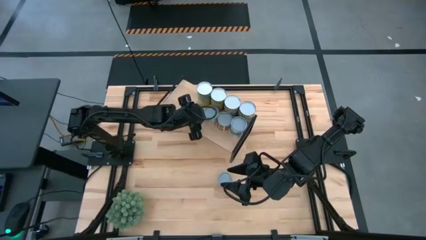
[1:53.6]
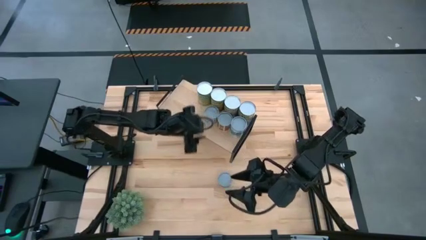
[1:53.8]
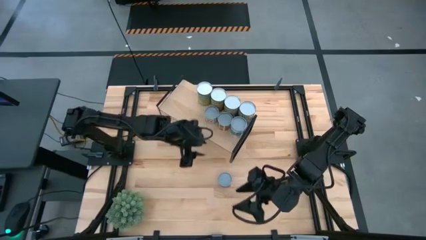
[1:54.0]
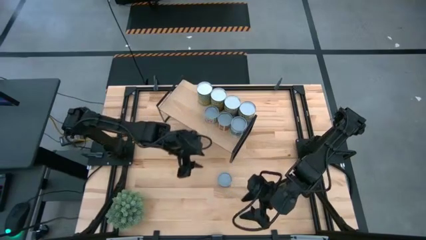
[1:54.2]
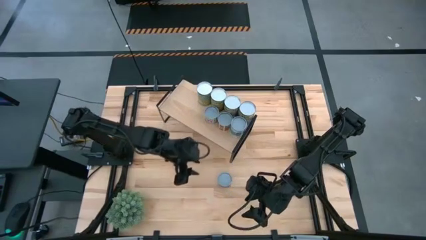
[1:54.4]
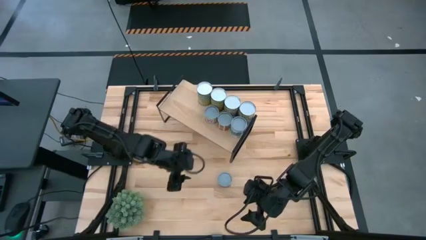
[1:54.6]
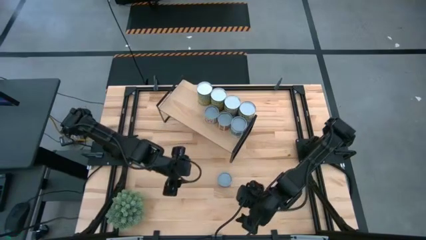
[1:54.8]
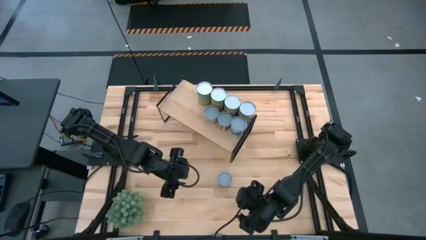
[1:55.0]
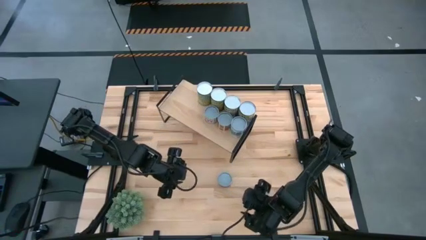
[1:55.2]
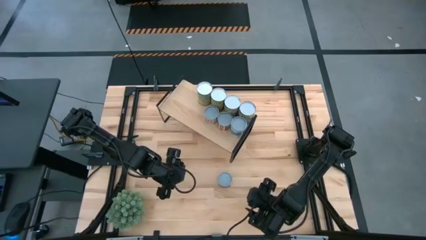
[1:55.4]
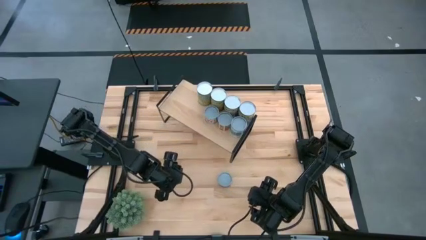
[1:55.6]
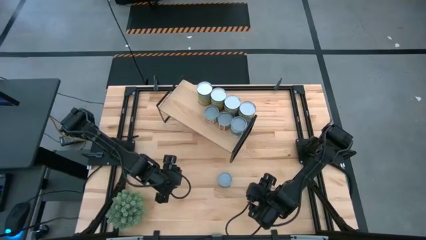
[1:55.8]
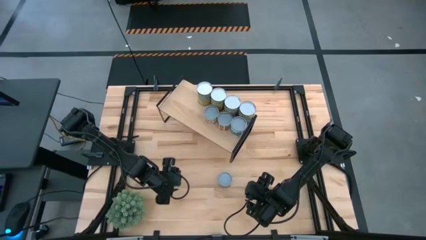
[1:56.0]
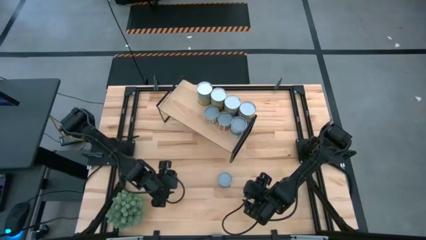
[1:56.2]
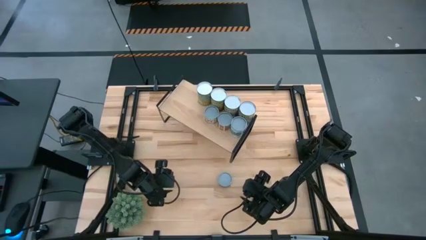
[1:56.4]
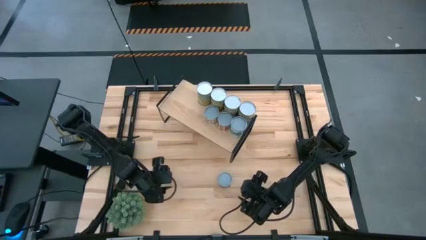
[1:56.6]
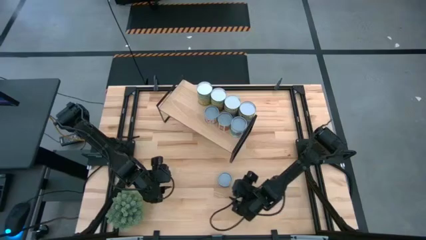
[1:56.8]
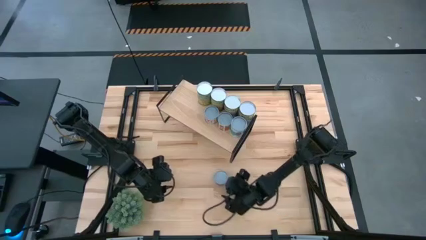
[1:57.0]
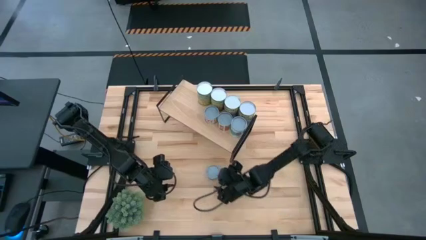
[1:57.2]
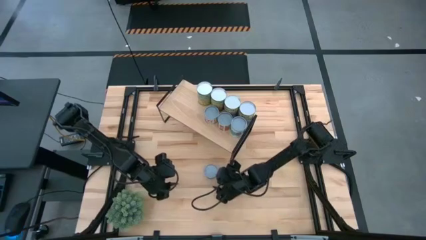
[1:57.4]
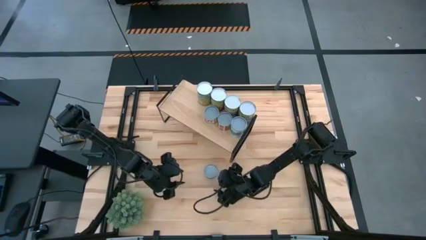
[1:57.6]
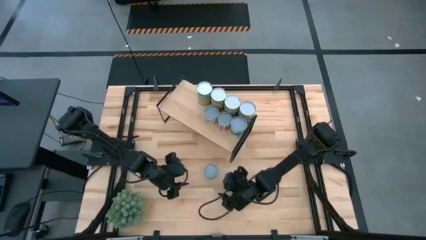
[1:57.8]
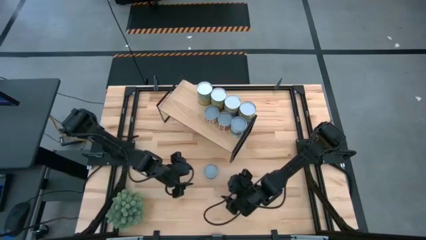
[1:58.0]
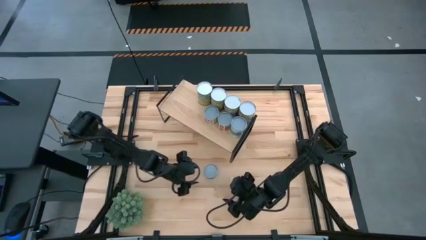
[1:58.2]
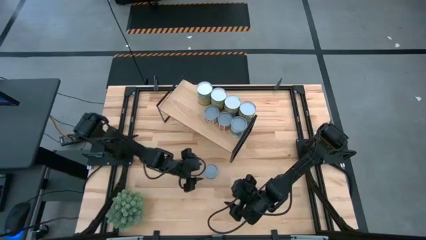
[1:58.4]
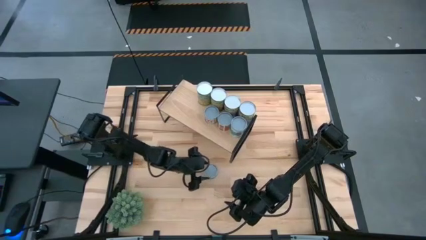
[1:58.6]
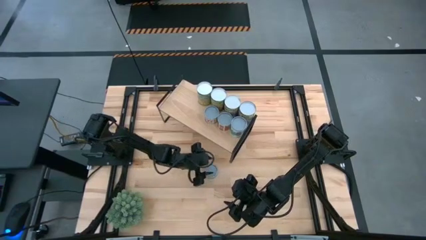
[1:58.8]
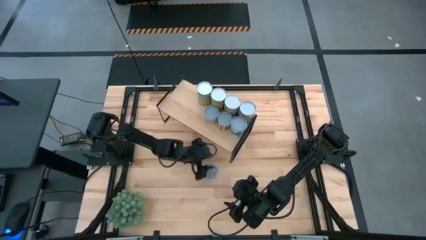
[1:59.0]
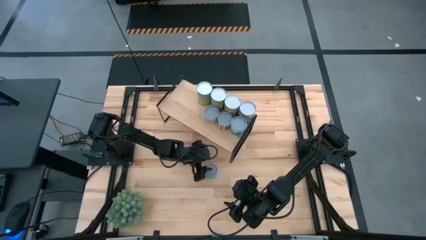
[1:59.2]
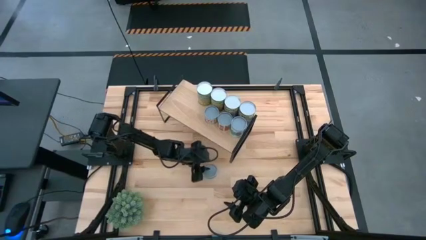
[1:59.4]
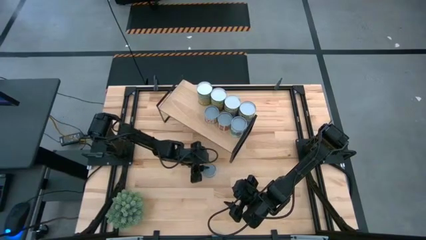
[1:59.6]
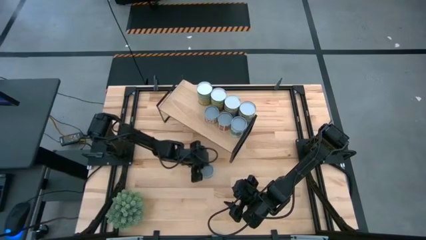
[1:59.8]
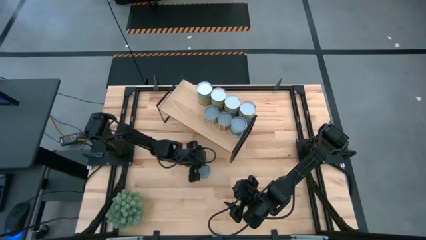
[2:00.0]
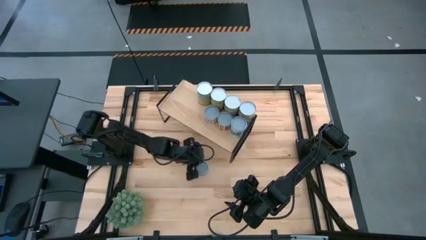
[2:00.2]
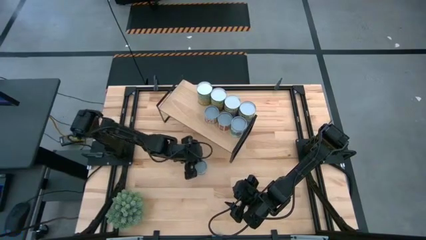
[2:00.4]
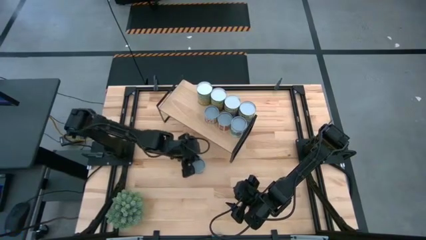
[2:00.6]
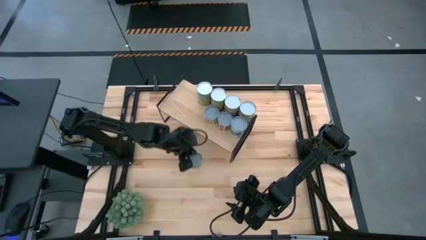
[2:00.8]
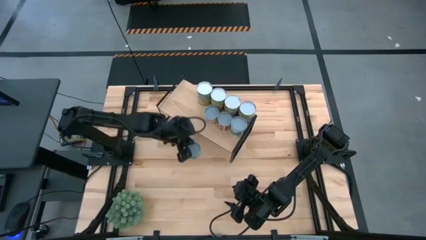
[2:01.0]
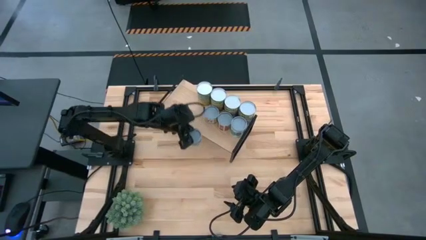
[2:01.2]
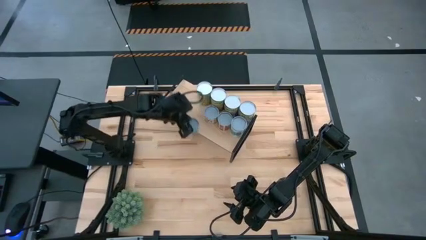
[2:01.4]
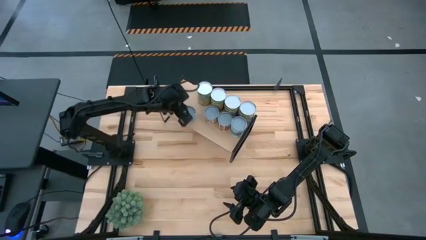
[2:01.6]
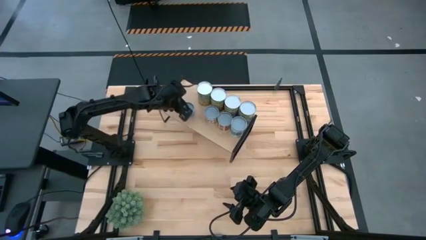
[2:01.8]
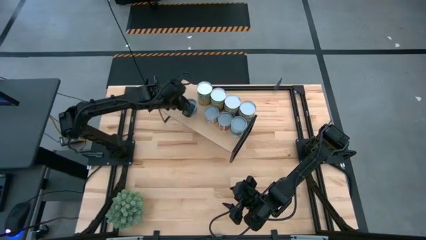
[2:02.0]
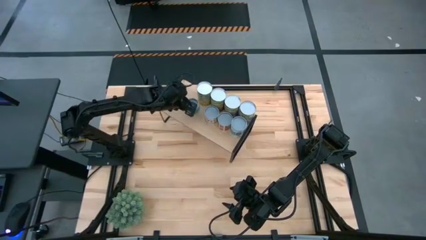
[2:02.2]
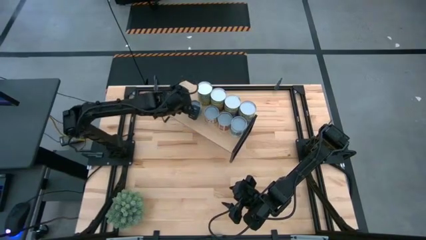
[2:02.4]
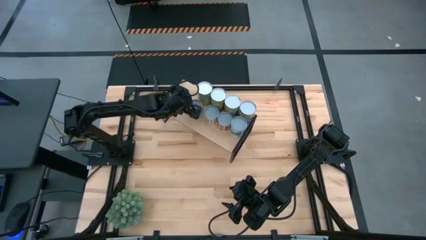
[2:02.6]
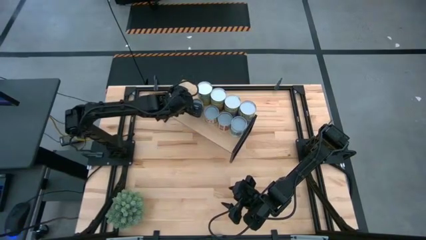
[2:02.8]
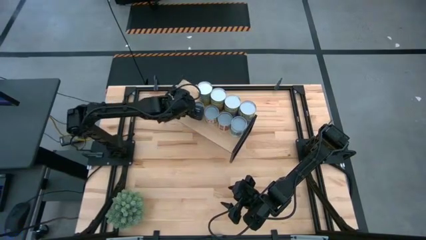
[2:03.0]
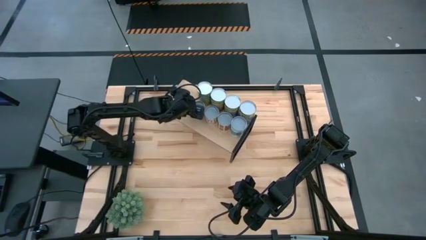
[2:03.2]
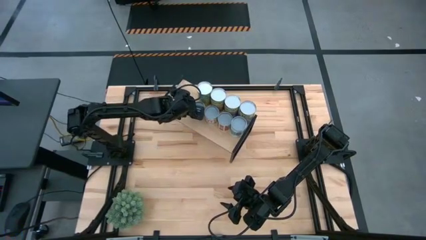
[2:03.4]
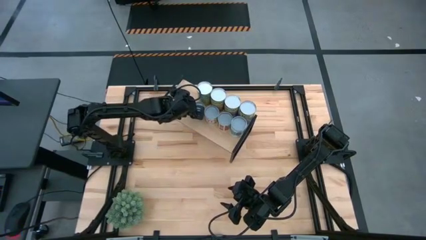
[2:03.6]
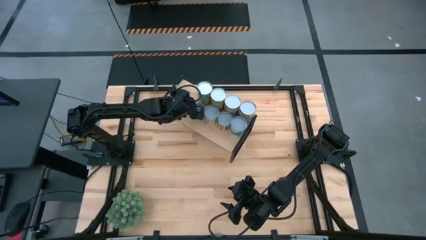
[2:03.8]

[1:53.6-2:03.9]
Task: Pick and place cans onto a shelf
Put the canned tuna on the shelf
